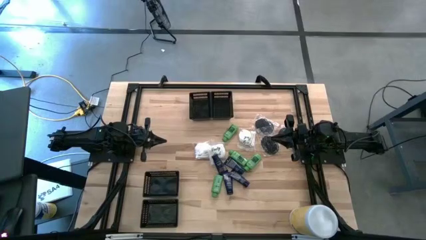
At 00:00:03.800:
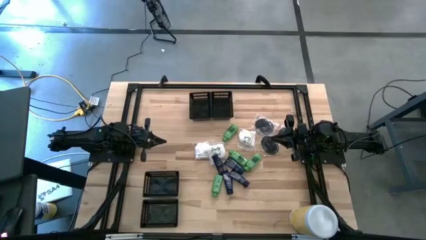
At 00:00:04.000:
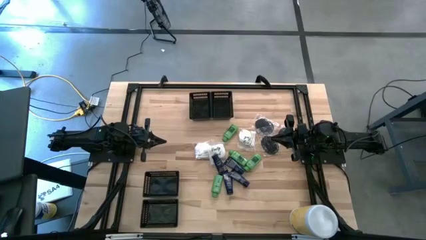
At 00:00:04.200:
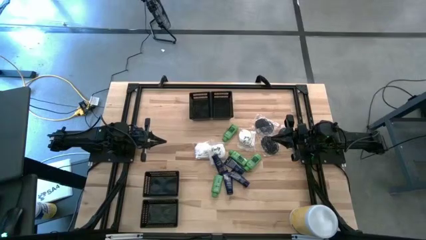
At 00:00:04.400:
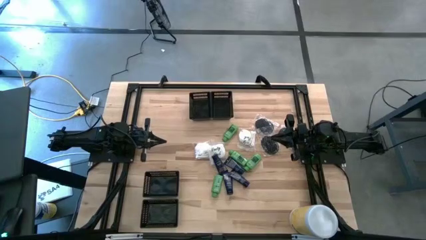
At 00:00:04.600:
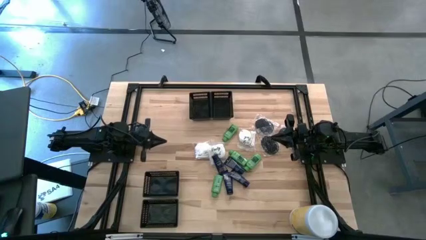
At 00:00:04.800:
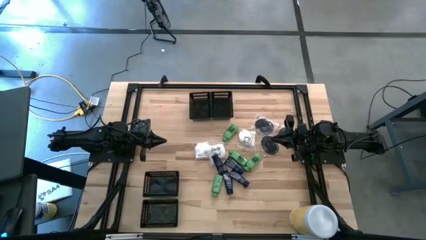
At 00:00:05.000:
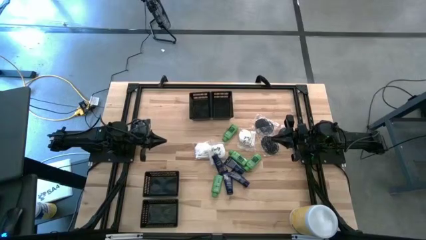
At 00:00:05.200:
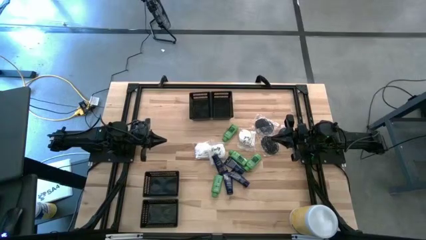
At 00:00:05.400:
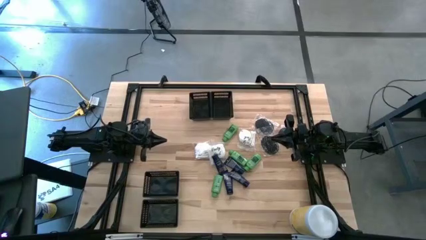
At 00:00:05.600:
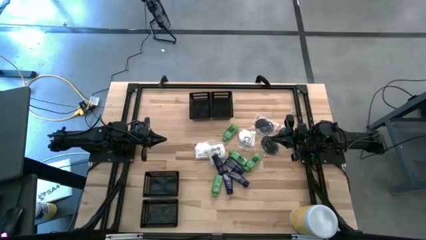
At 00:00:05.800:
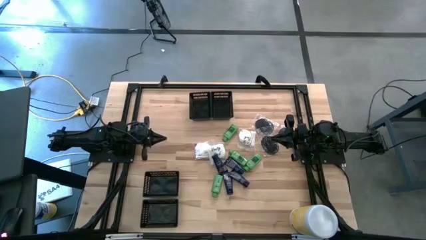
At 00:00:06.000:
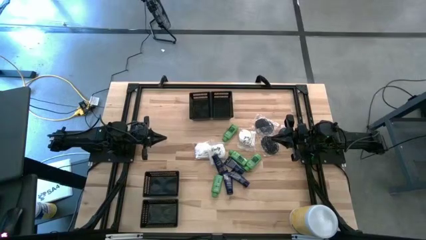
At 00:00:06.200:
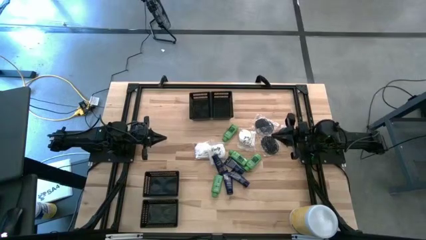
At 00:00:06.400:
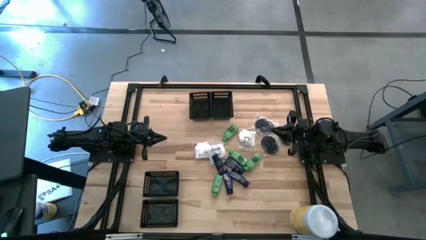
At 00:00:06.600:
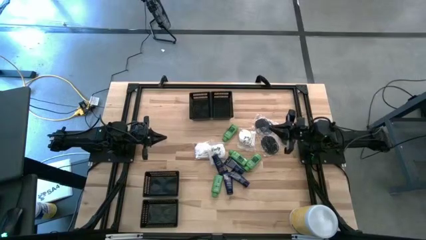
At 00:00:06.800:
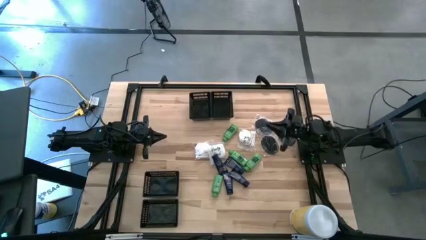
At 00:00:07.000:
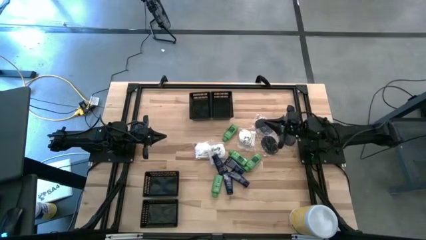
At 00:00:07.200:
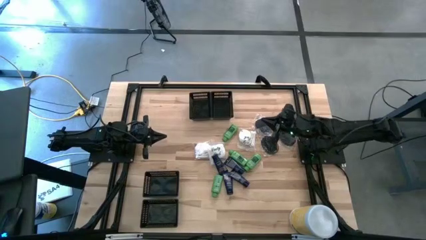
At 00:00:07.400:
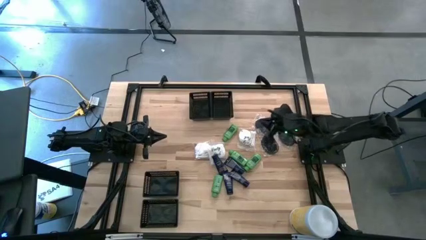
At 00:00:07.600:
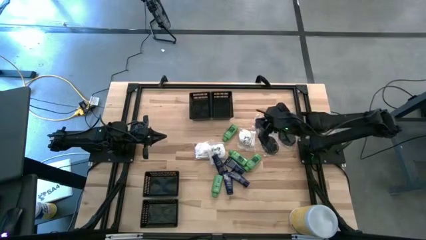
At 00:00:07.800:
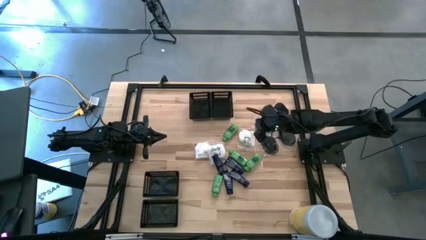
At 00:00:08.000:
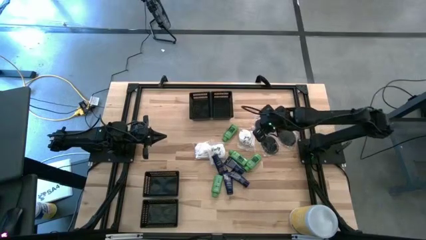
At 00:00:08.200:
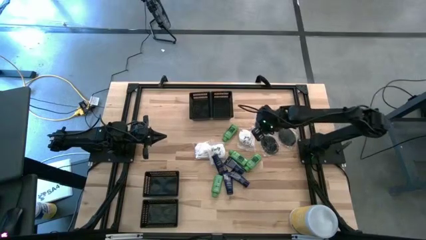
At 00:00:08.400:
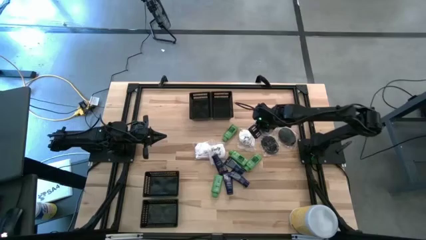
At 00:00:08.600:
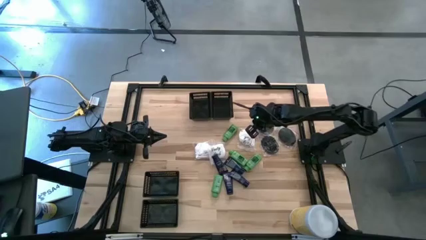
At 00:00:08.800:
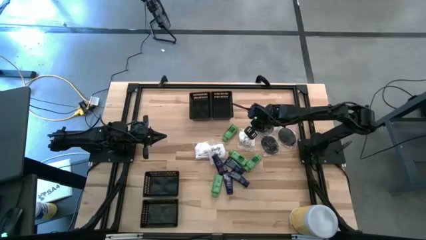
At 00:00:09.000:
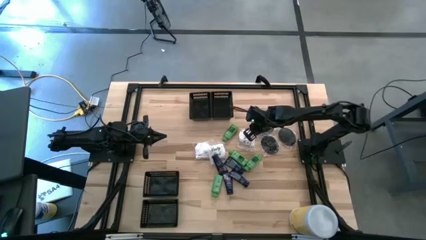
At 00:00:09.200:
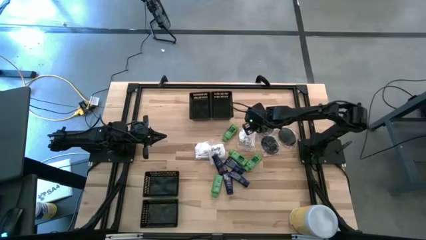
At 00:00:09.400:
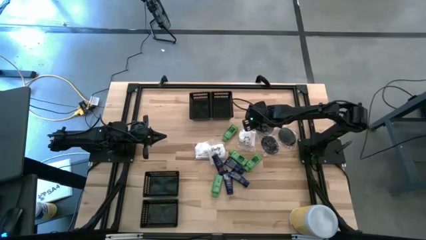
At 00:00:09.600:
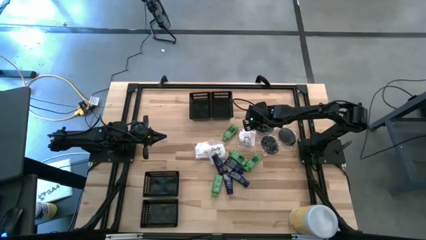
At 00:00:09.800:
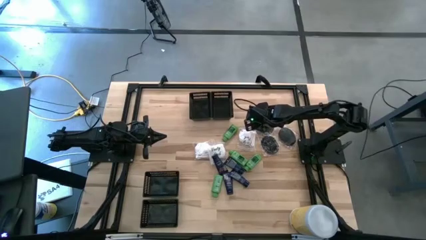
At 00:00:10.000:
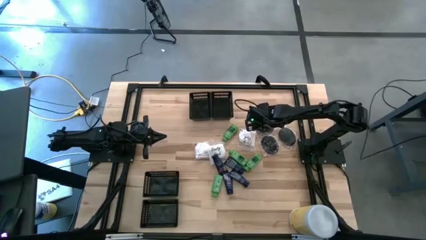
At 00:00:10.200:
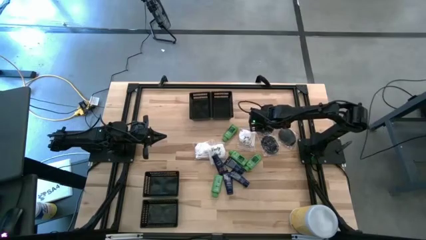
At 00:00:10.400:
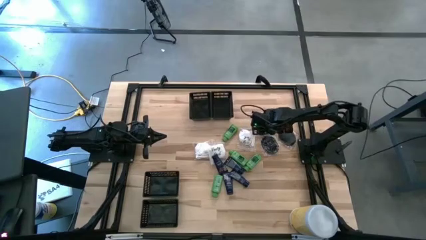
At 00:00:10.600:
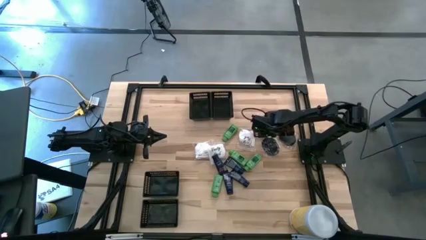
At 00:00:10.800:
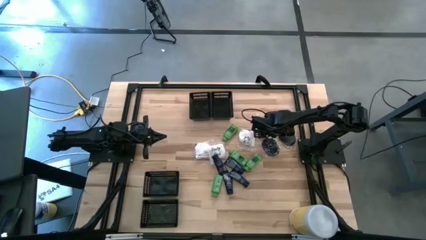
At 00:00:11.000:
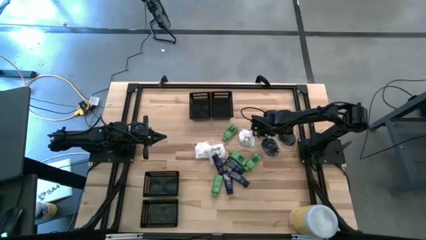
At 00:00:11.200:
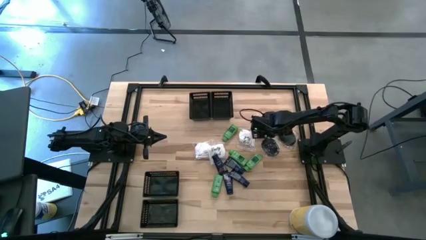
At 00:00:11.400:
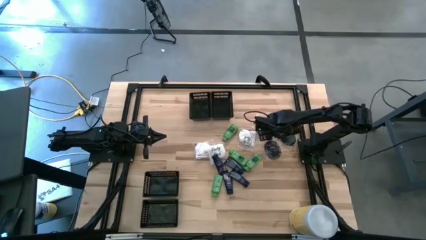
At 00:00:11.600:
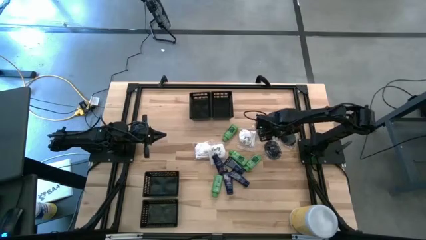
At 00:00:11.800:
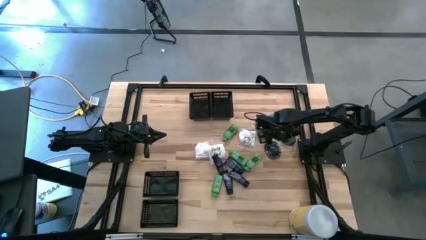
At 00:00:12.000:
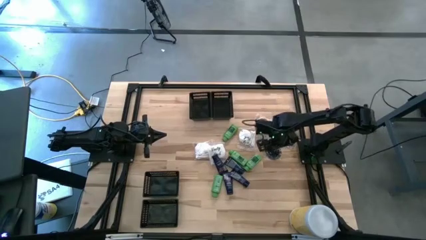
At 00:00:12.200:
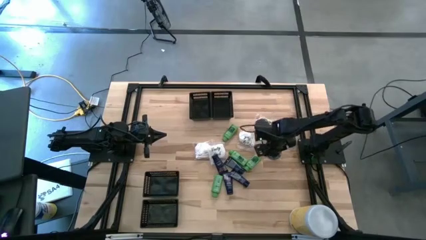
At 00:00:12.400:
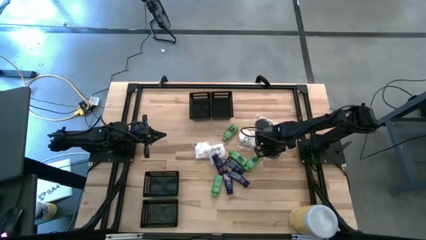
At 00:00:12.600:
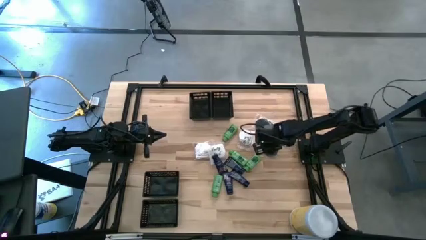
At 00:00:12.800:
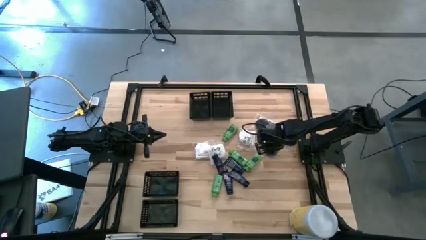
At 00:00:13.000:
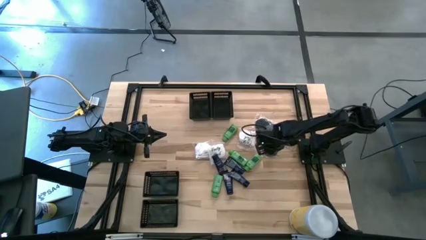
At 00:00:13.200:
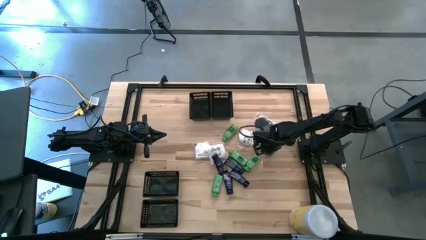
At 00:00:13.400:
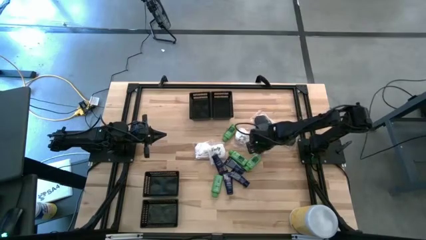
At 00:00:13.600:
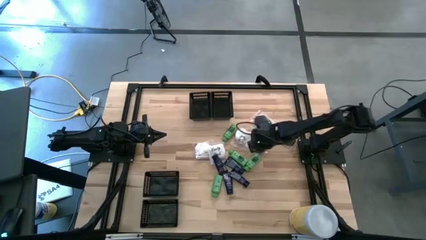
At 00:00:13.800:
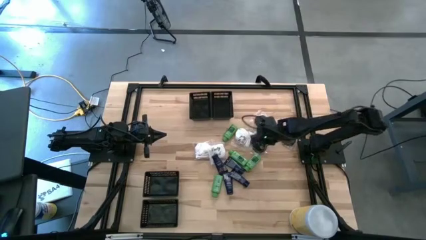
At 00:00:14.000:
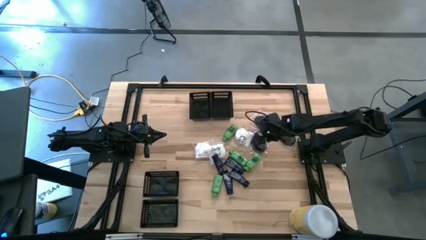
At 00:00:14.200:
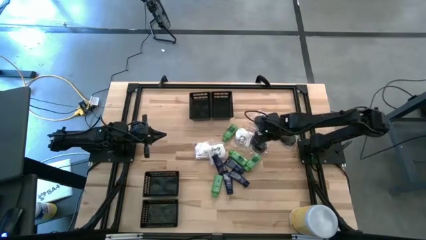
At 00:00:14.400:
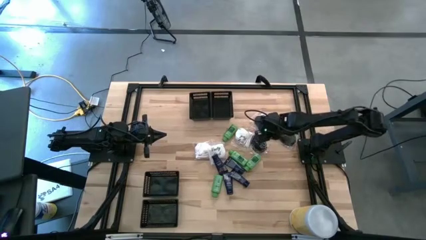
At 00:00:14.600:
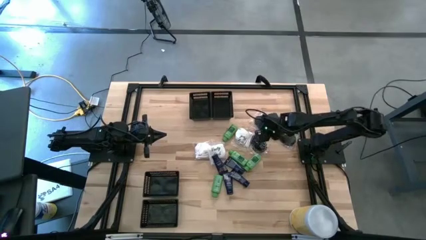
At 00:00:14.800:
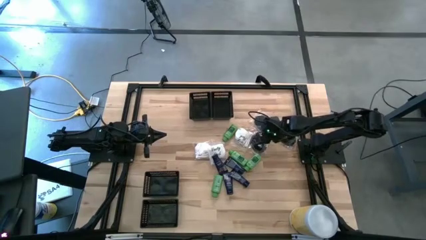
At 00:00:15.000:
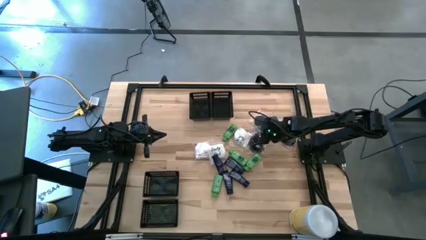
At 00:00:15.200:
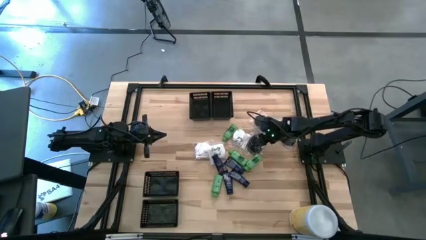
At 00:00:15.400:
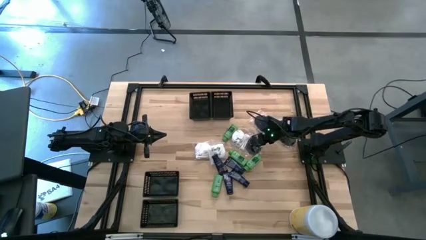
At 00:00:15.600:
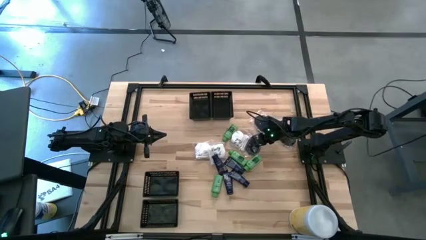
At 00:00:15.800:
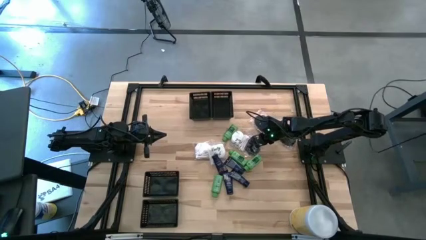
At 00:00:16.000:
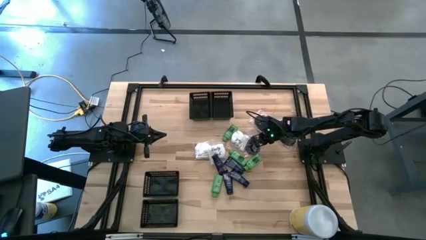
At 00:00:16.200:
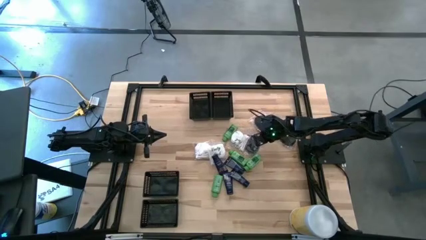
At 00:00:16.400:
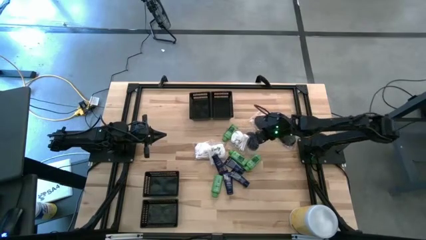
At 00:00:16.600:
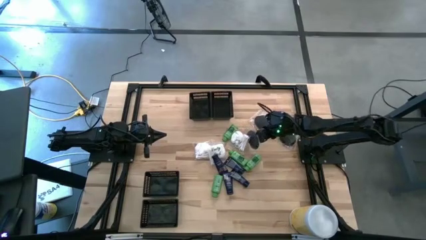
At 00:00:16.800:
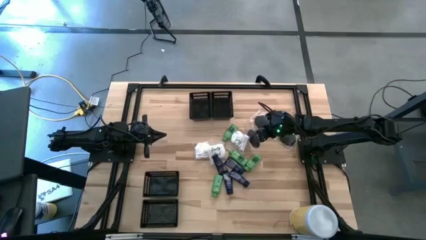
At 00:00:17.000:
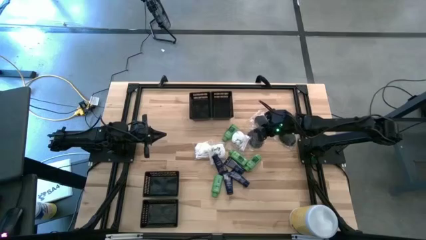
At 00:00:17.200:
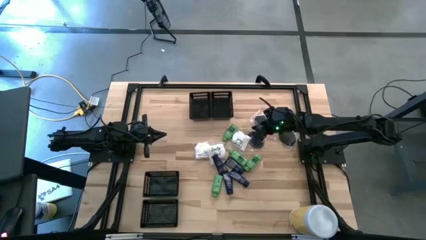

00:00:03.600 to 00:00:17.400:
Task: Pick & Place Travel size toiletries
Put the black hairbrush into the top right basket
